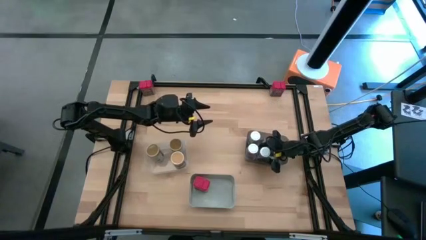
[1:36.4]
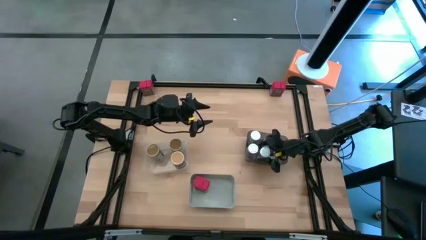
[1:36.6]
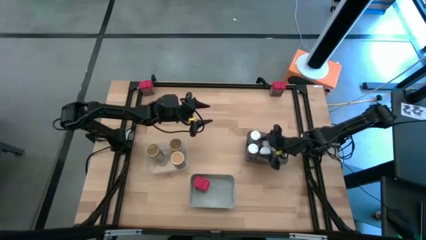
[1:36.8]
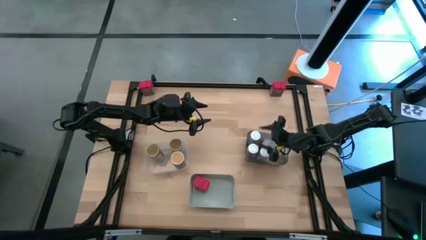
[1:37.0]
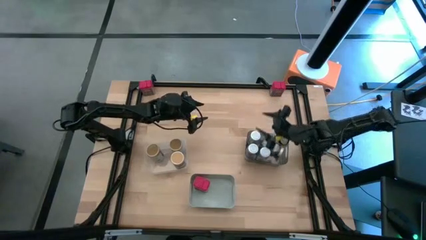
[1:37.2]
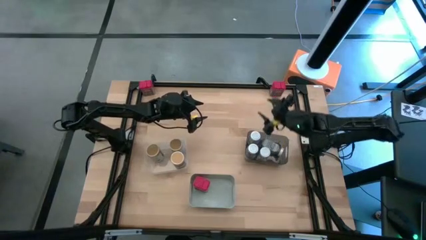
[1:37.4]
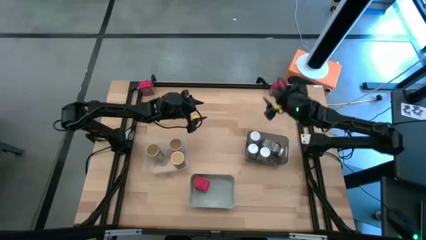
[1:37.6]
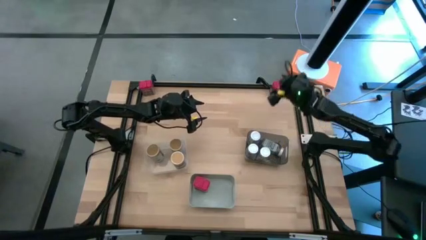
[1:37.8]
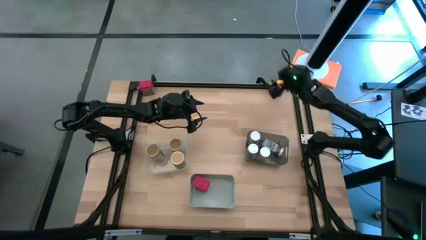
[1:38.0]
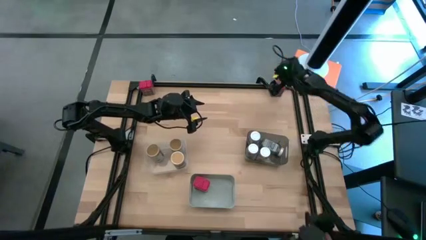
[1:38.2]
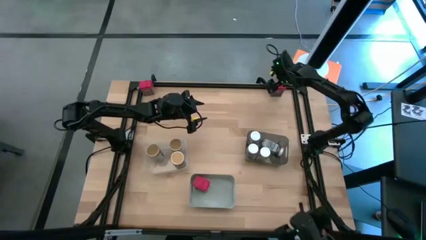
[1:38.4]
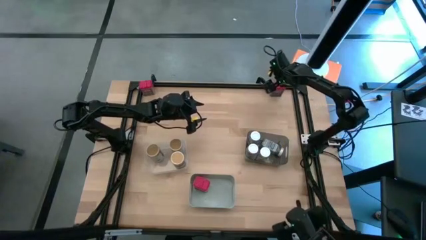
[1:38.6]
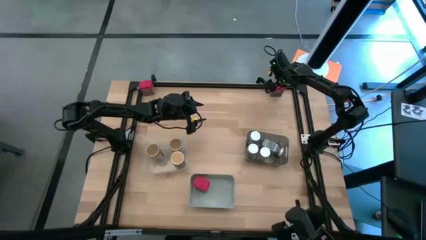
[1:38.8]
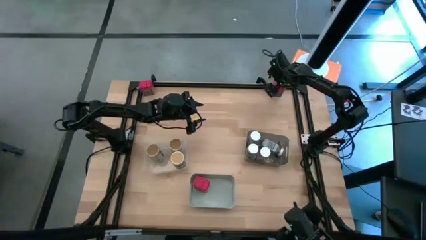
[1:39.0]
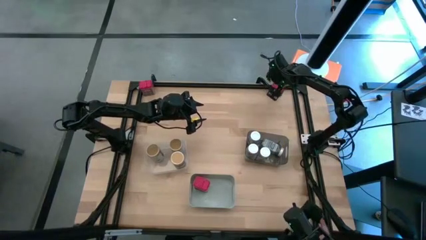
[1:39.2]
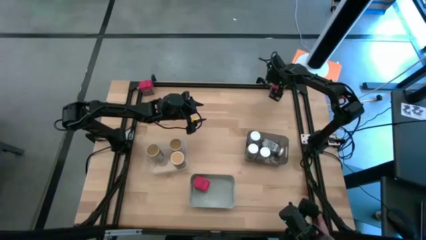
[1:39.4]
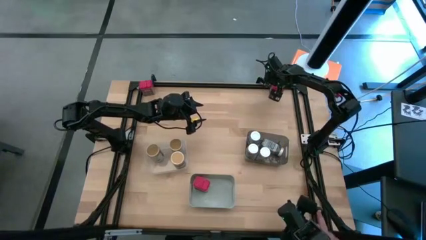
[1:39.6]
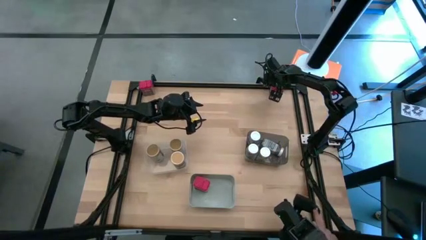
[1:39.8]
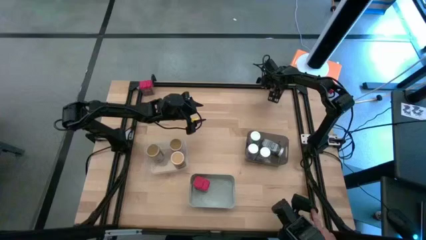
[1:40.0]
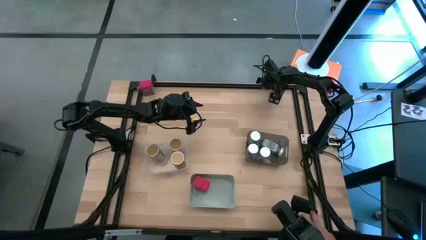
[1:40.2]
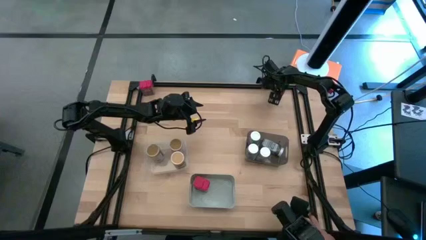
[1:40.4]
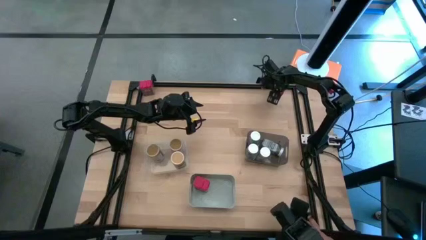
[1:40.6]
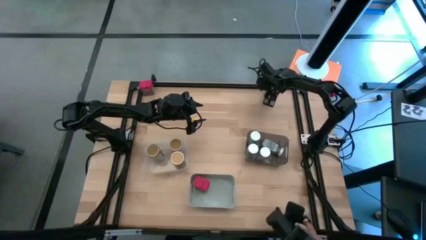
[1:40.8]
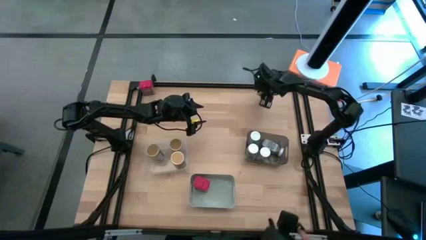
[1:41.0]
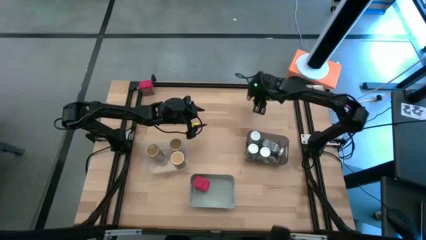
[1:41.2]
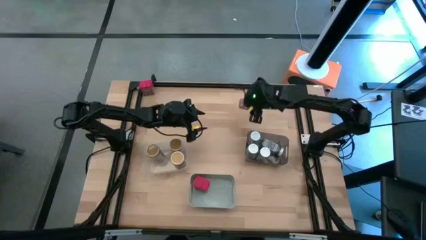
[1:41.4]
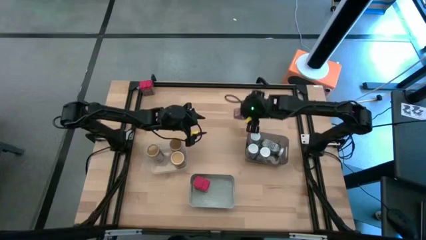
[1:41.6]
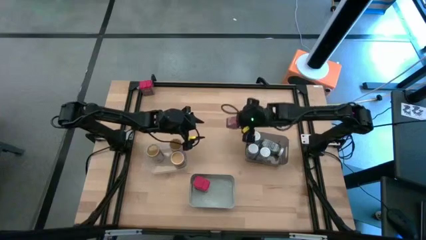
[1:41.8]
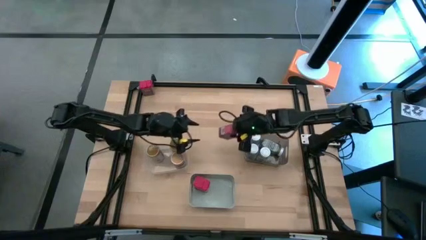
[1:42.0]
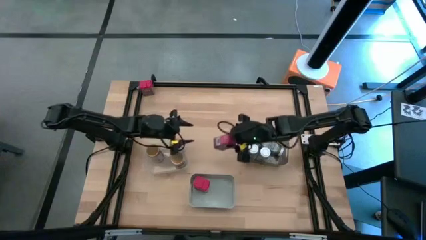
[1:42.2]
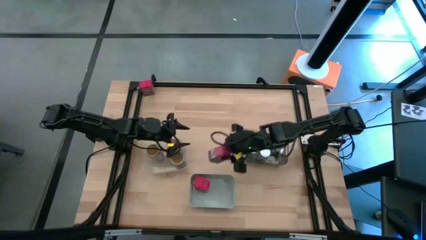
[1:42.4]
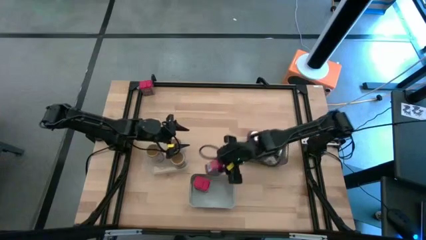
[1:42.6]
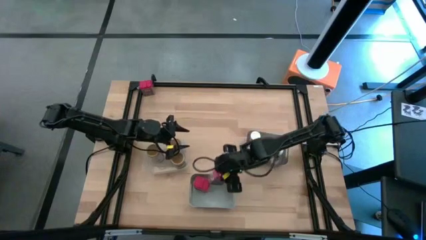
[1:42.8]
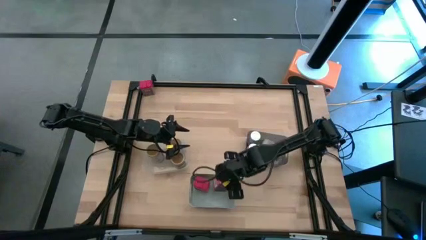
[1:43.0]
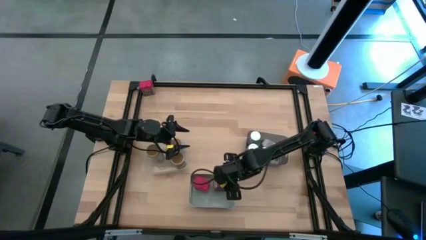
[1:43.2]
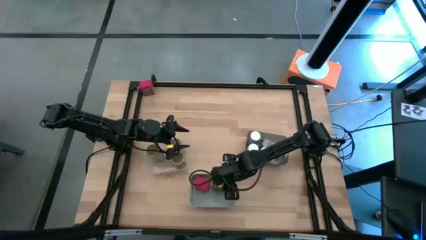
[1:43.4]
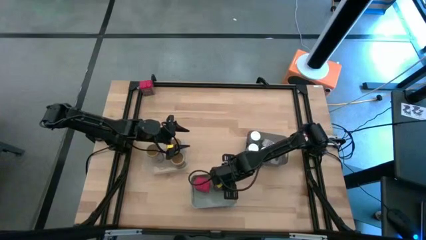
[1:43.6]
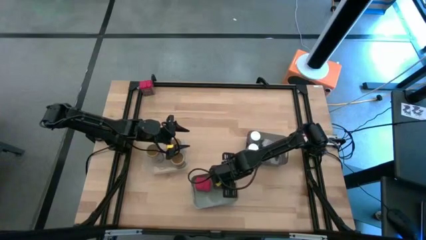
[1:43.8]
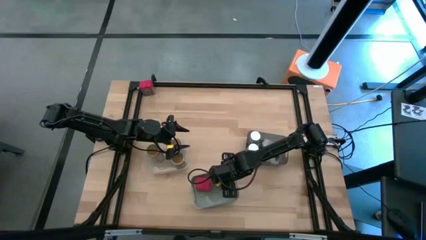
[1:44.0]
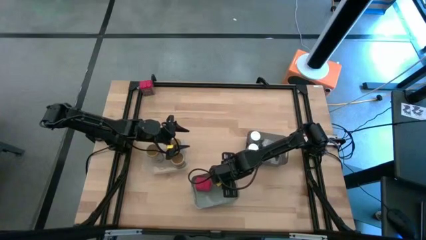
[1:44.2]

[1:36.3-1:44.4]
Task: Sort spices by type
Put the red seasoning can into the gray bin

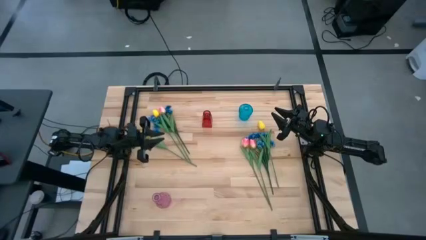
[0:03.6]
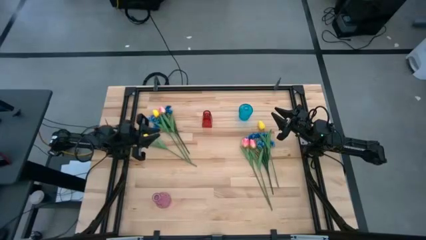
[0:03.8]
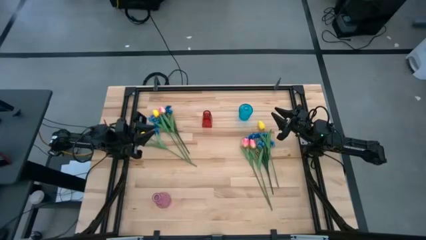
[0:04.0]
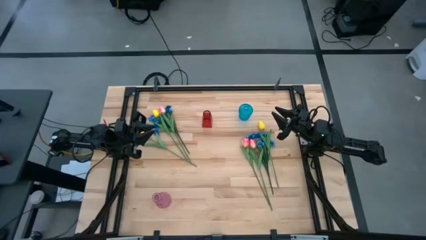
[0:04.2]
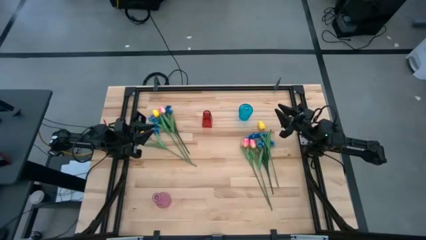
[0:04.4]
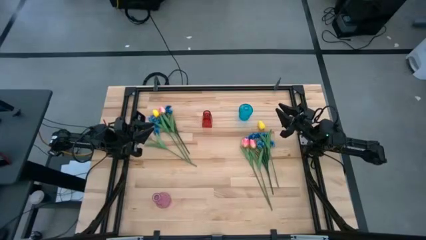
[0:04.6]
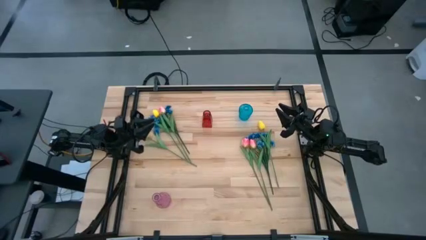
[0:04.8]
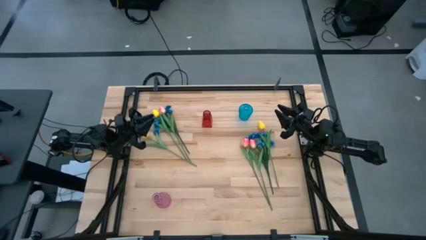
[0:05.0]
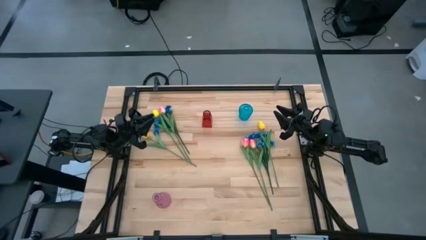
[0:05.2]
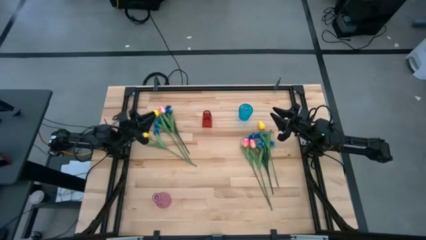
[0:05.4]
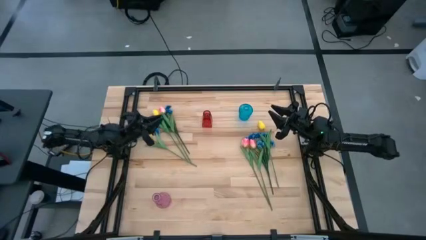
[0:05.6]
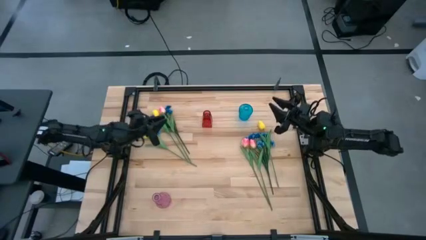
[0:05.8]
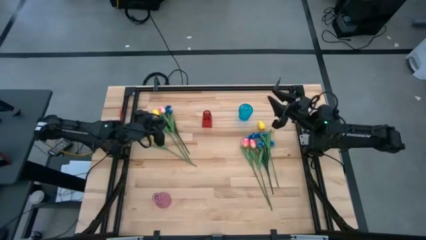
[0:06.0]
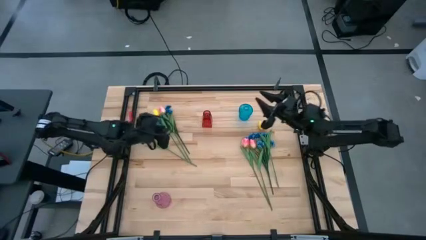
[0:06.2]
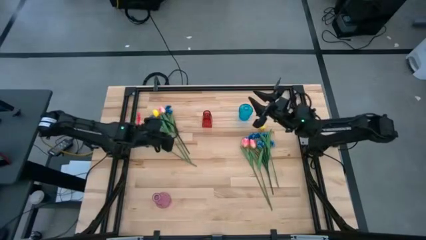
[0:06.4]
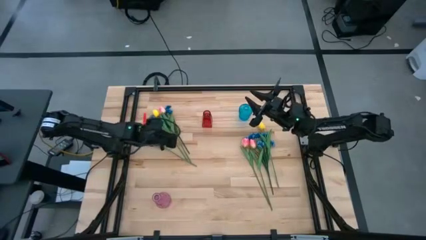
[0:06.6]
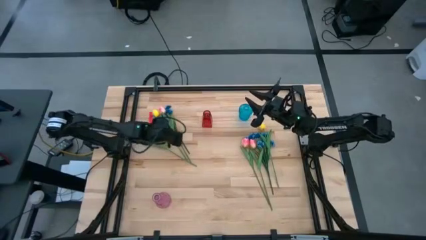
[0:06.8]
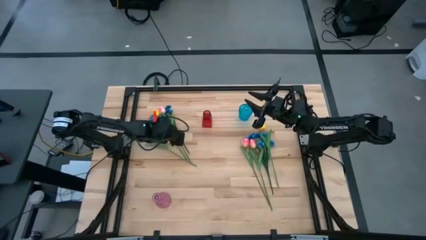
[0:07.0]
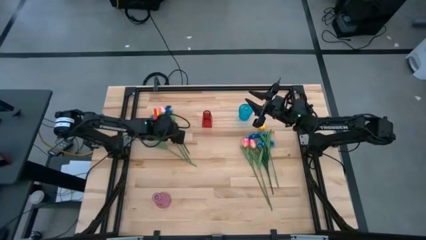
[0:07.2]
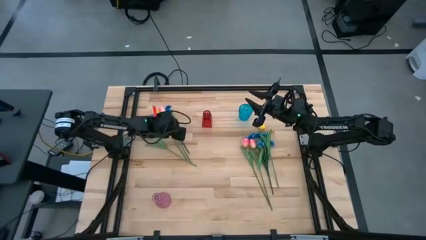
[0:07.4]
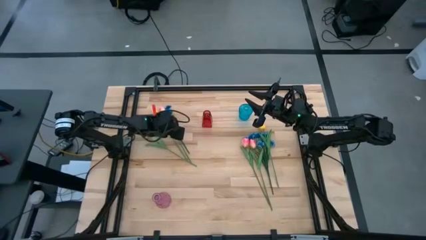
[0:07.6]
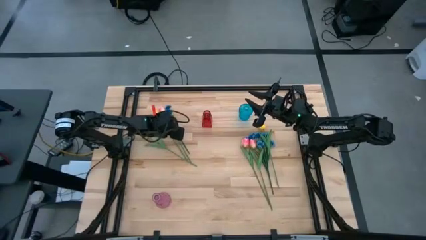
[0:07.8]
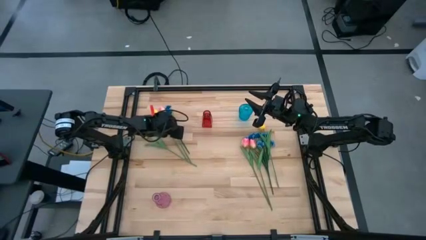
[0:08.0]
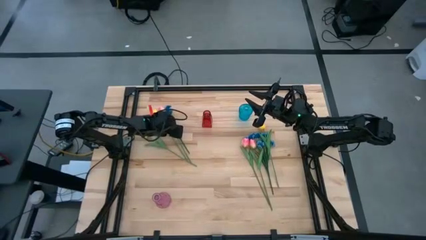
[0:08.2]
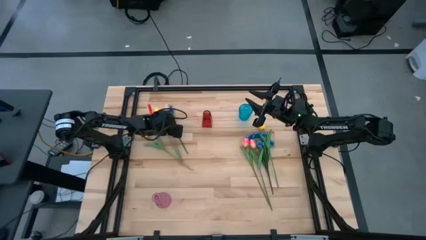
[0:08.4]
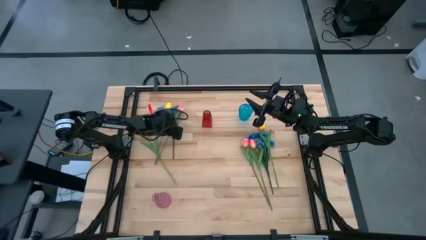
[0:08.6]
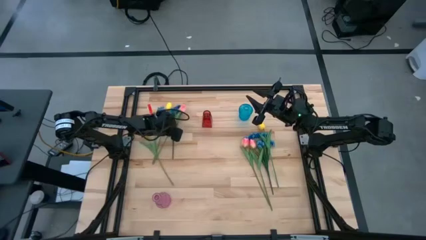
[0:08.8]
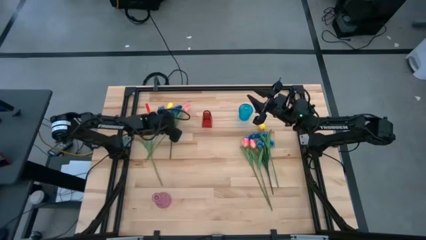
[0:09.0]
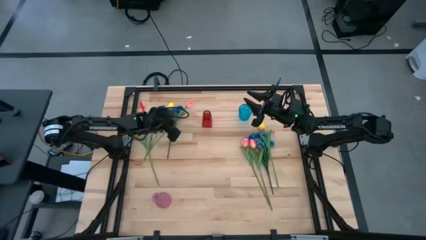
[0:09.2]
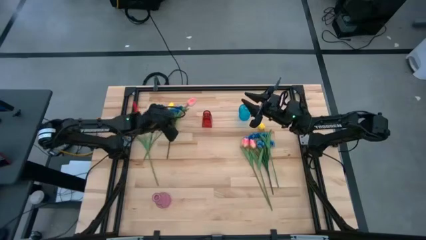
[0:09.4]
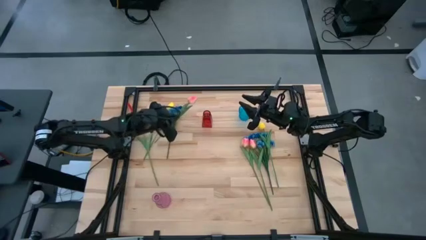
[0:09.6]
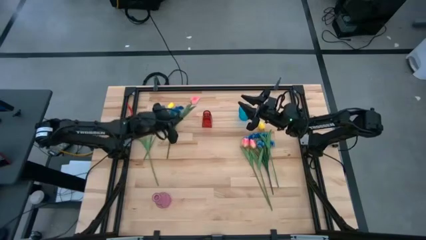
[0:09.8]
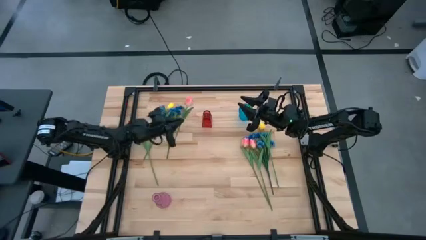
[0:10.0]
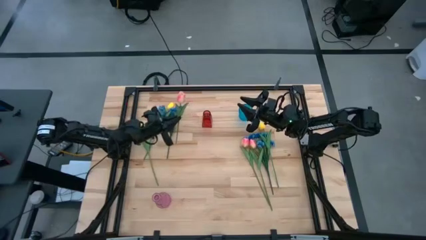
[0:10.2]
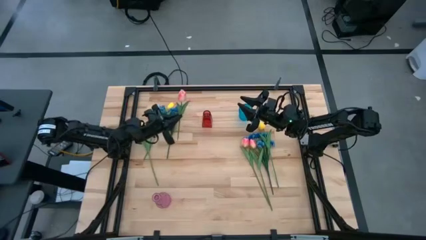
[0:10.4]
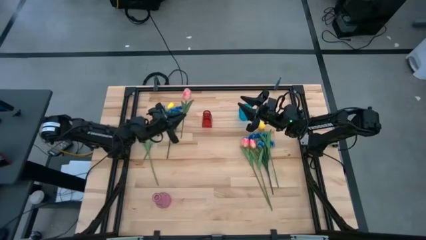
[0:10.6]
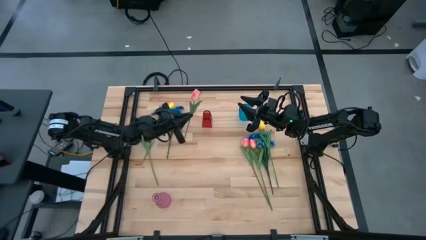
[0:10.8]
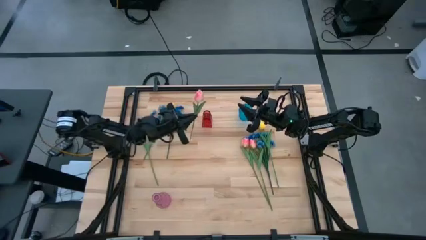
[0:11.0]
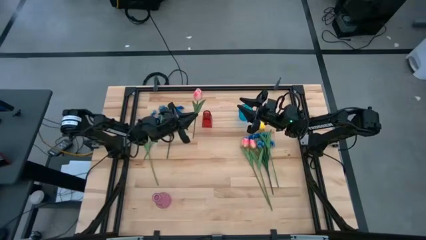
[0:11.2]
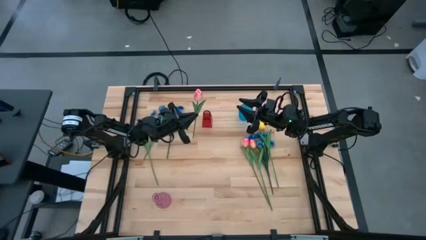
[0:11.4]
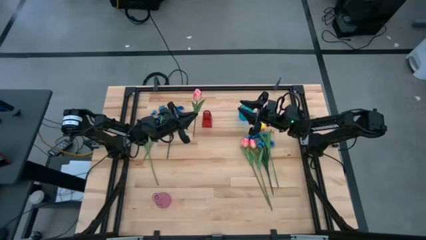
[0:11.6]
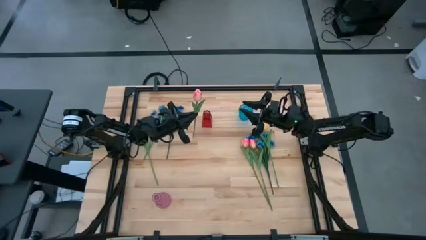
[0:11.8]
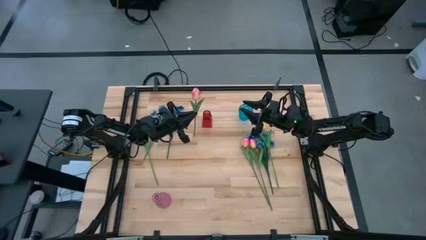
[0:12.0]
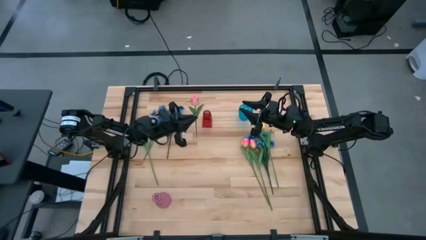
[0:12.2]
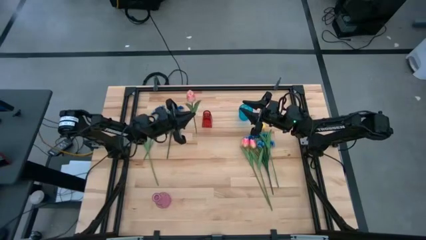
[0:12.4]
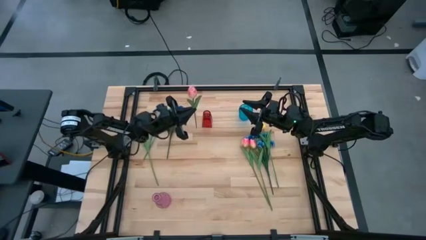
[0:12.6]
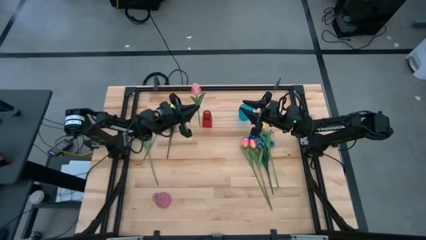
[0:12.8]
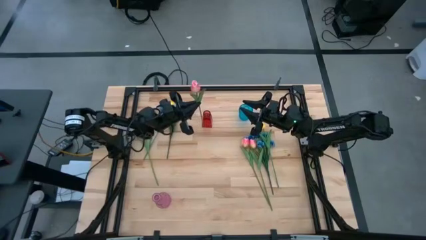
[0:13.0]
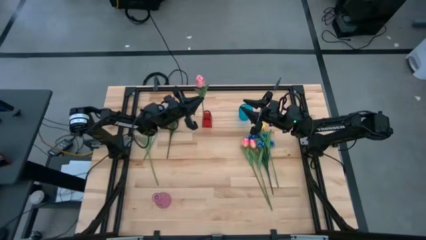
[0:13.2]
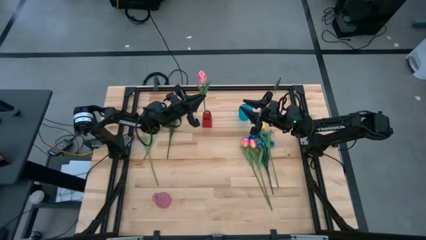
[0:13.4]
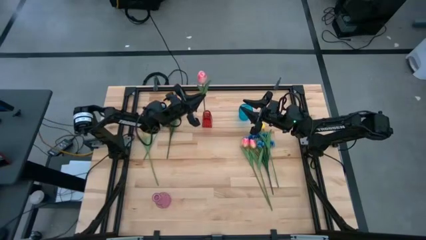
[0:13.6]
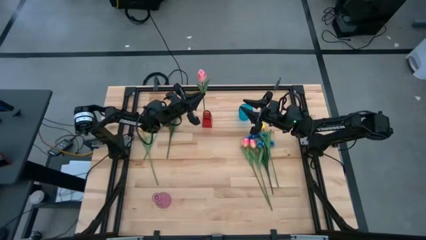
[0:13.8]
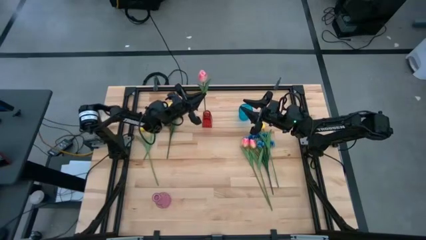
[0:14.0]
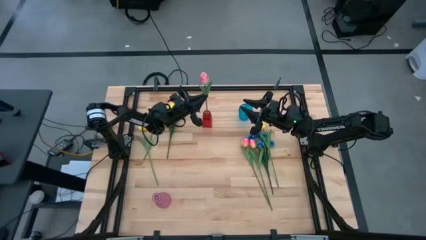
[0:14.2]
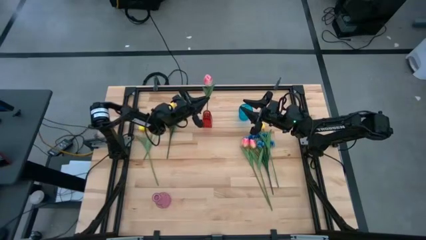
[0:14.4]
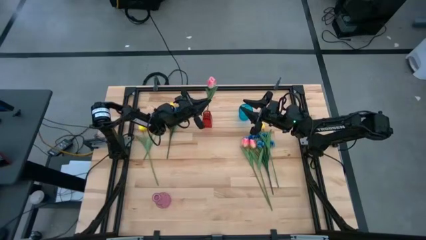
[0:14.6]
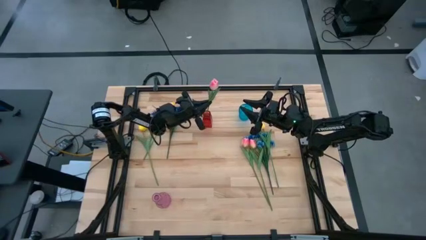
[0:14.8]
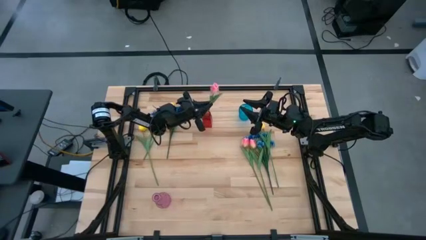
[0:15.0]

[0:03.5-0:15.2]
Task: Sort flowers into vase by color
Put the pink flower into the red vase
